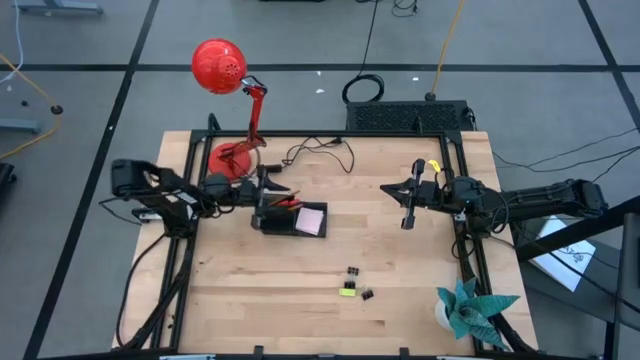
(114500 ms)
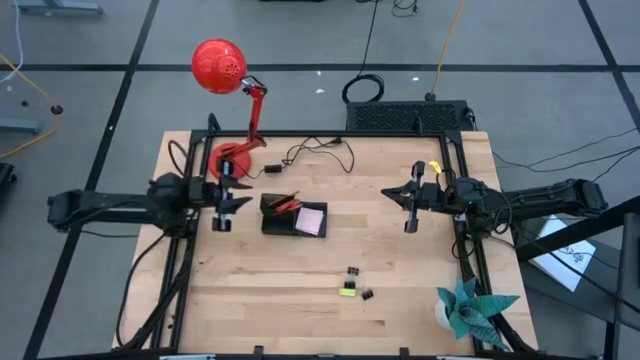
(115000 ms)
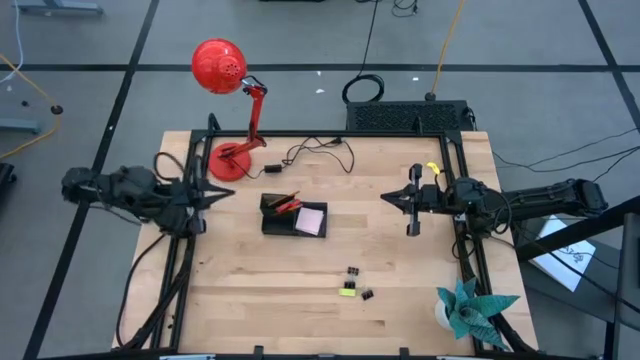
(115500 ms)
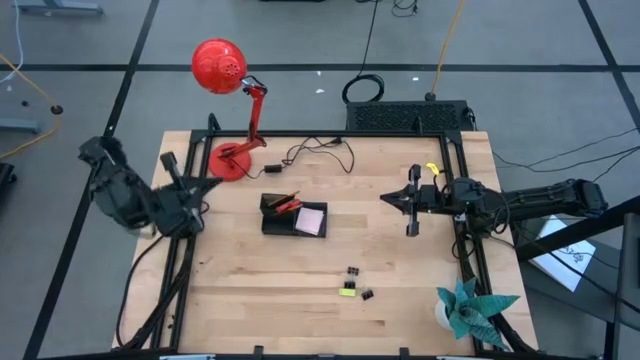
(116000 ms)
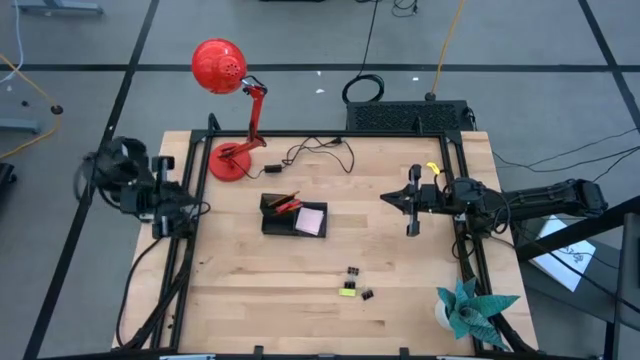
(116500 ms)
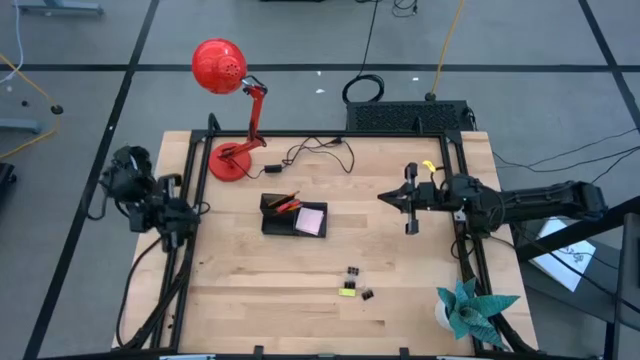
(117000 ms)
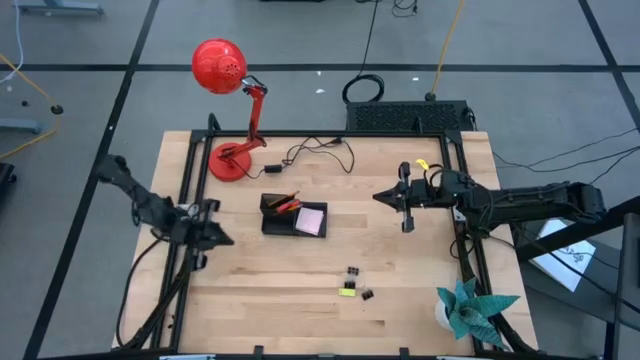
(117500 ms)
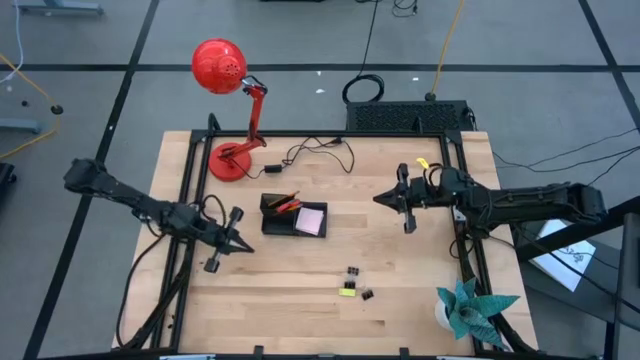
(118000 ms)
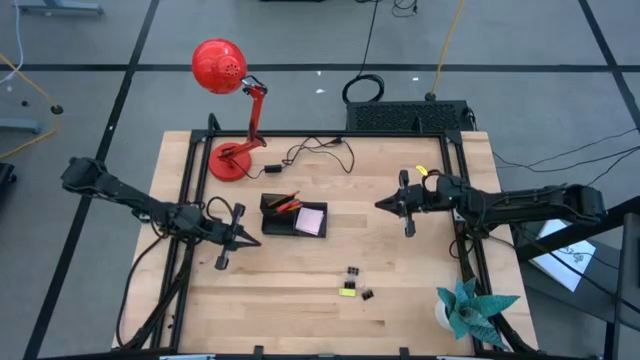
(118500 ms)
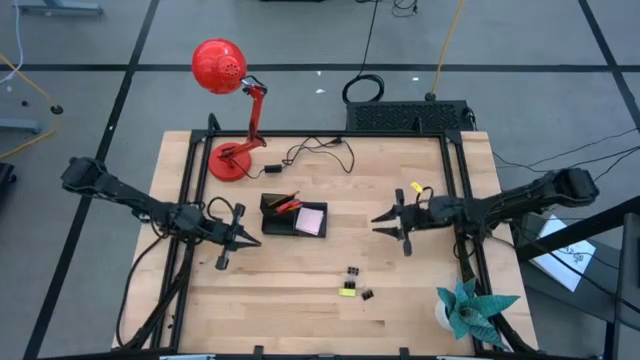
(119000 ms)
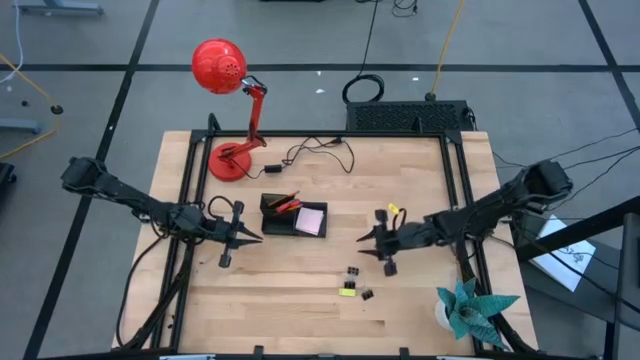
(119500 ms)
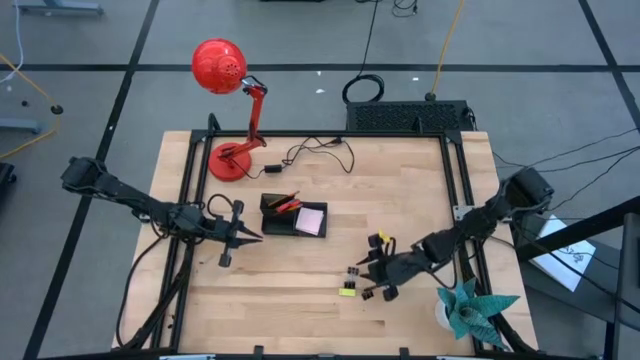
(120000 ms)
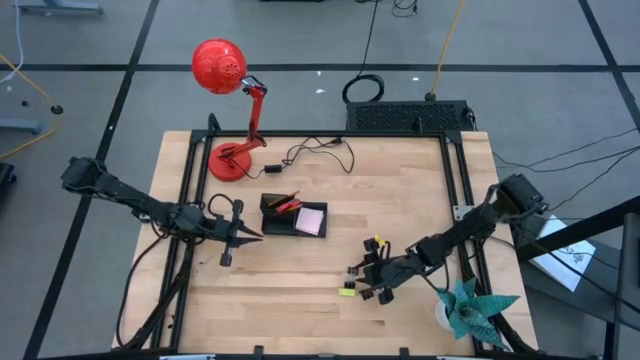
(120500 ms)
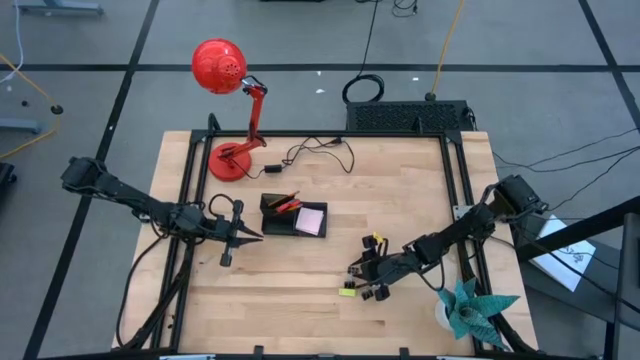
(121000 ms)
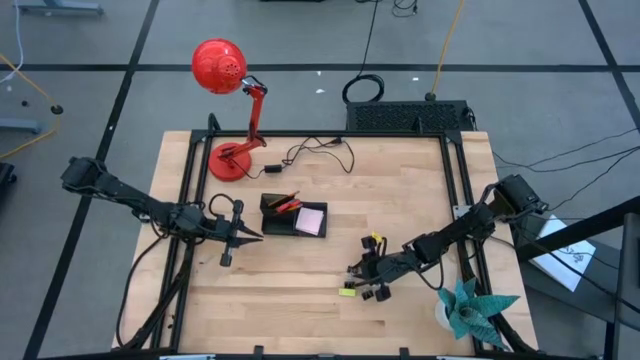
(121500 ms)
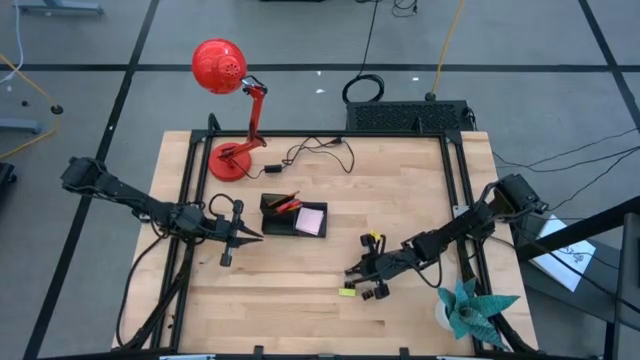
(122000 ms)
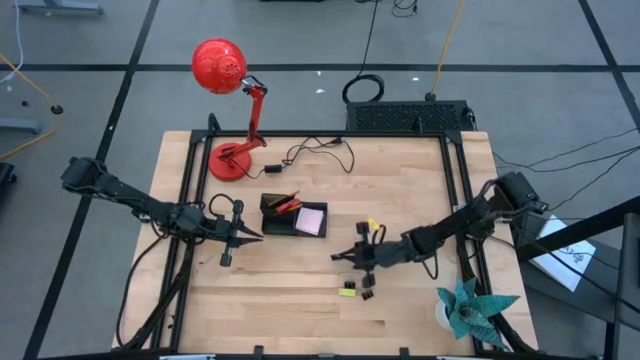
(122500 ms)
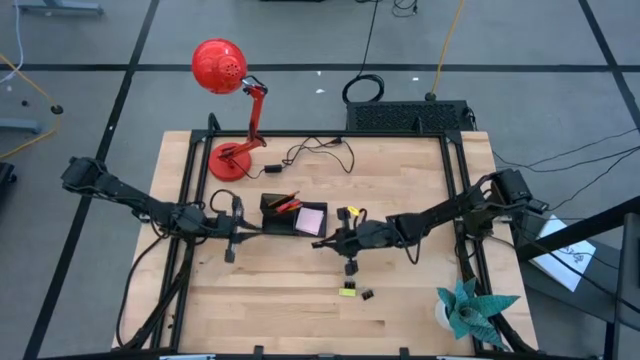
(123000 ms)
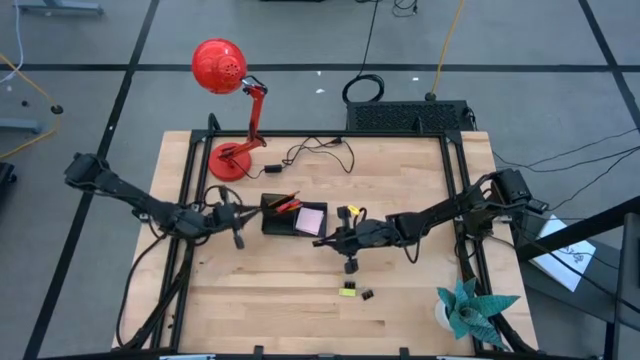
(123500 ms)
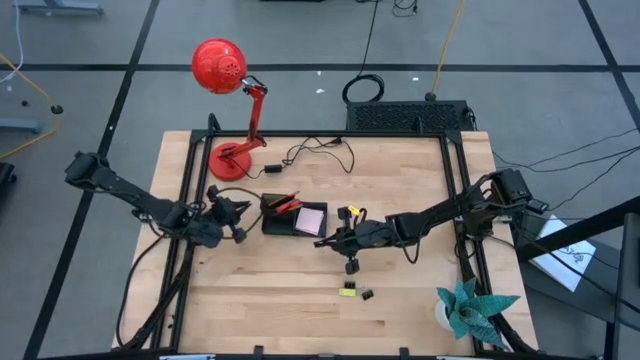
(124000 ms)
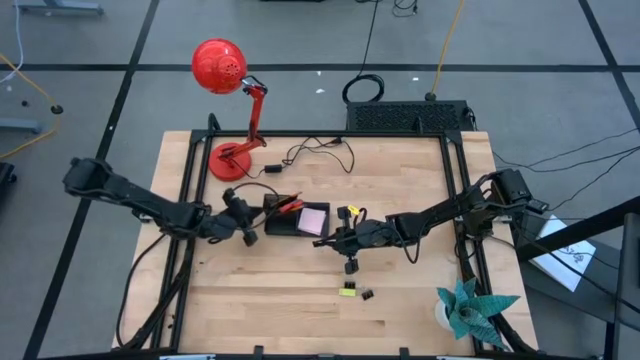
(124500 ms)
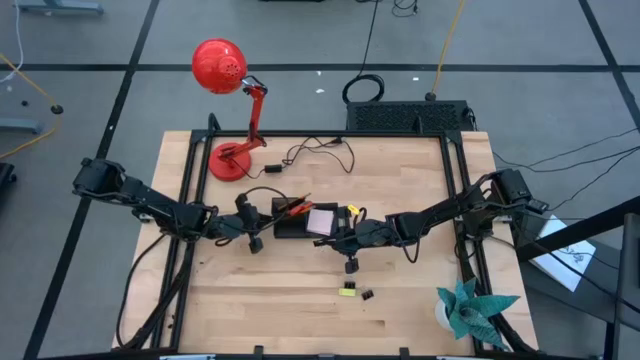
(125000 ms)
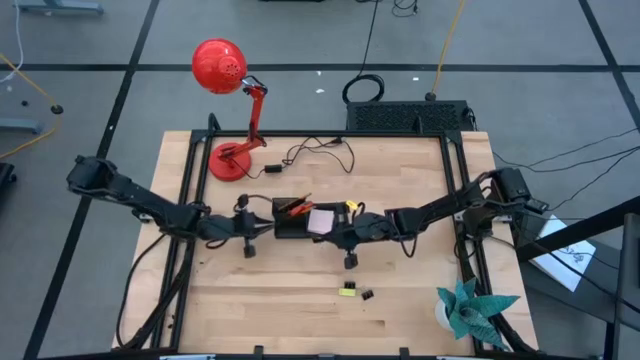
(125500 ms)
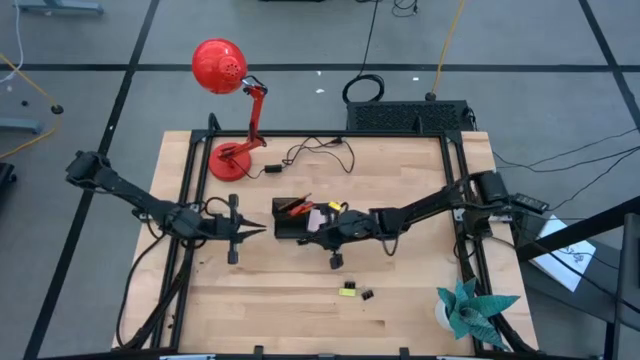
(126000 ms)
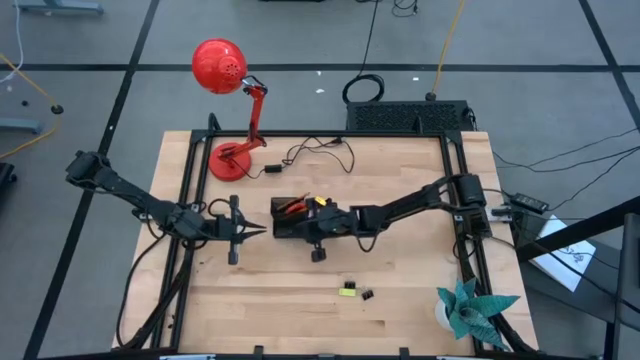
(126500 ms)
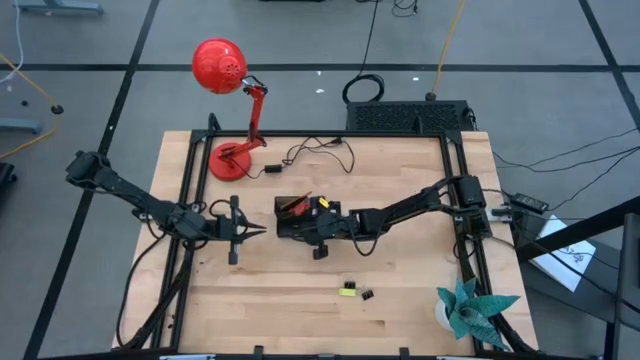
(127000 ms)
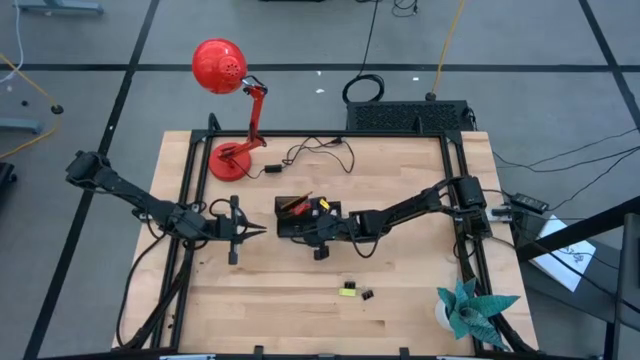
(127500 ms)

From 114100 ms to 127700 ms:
Task: Pick and place office supplies into organizer
Put the top binder clip into the desk organizer

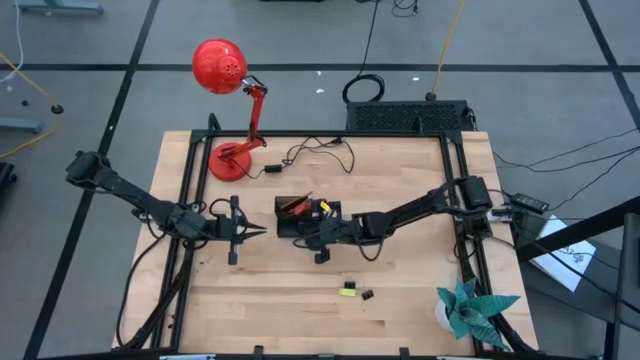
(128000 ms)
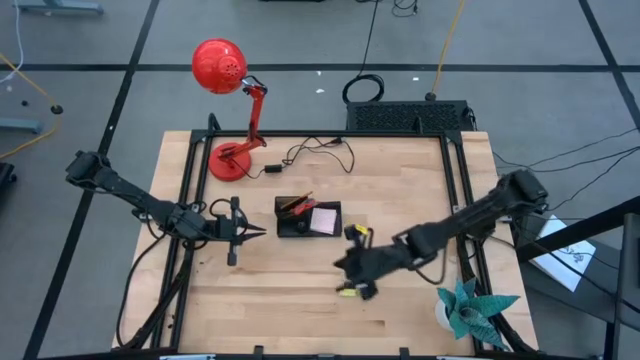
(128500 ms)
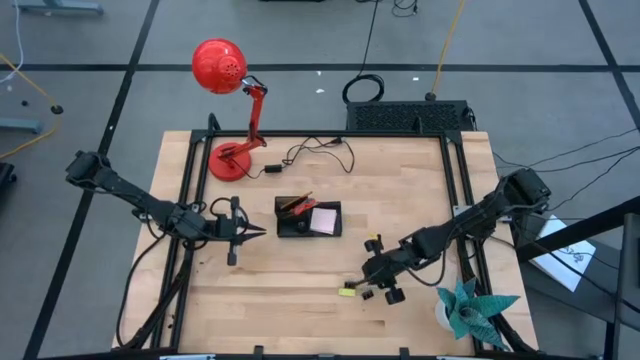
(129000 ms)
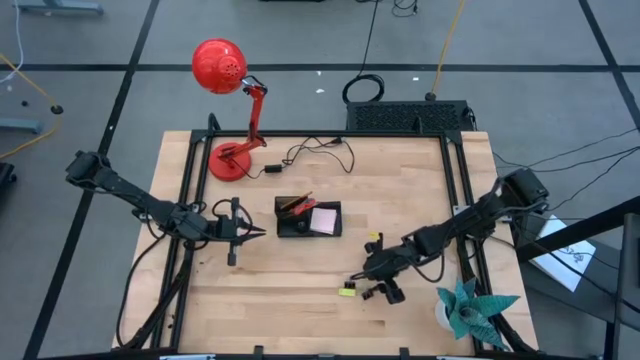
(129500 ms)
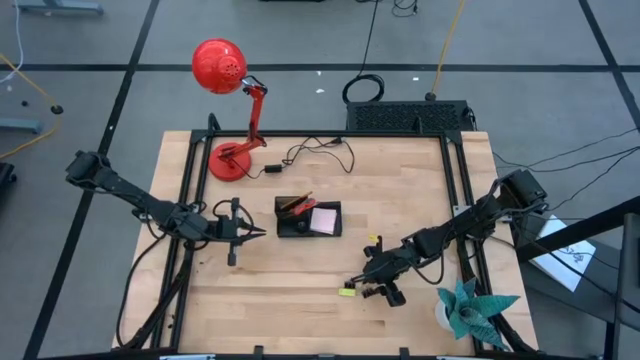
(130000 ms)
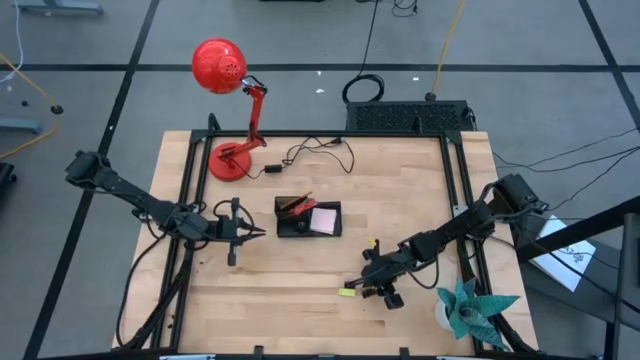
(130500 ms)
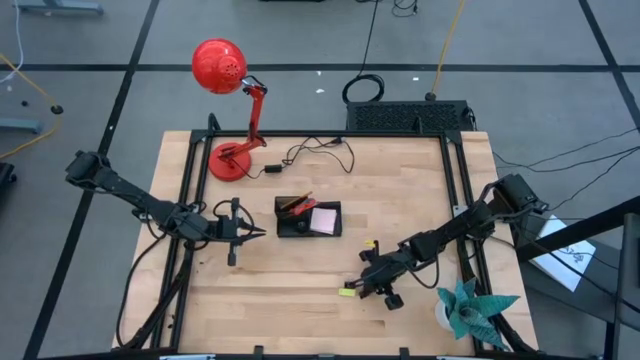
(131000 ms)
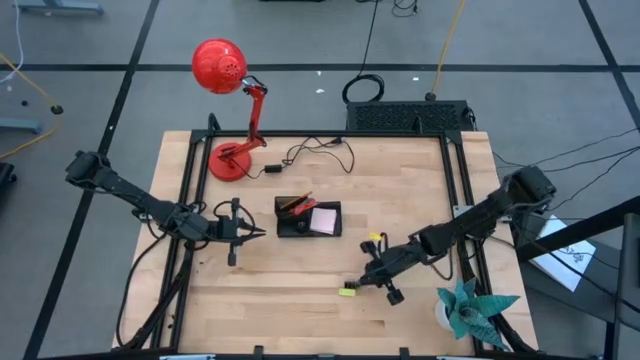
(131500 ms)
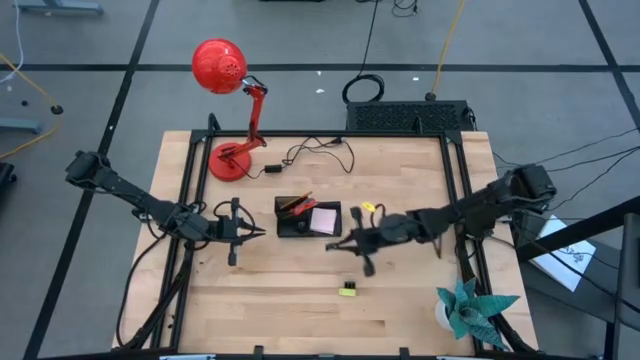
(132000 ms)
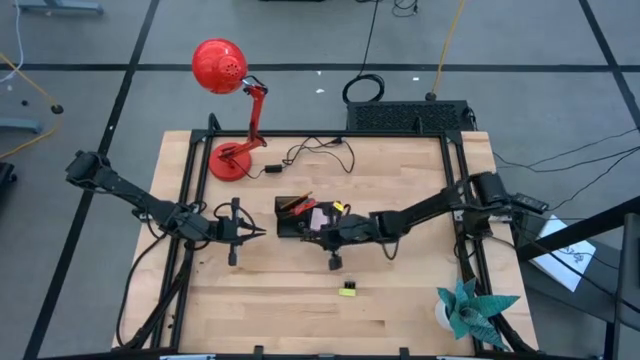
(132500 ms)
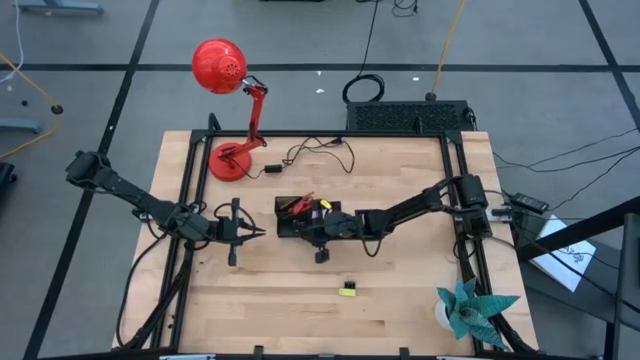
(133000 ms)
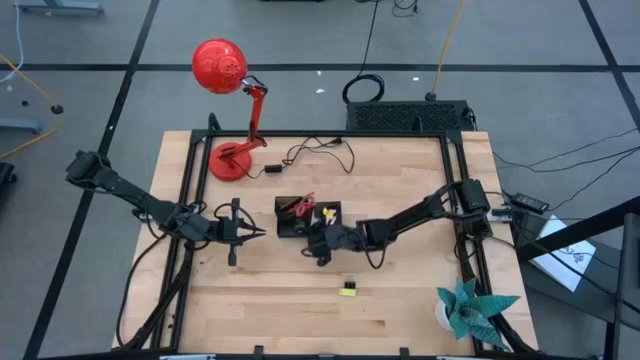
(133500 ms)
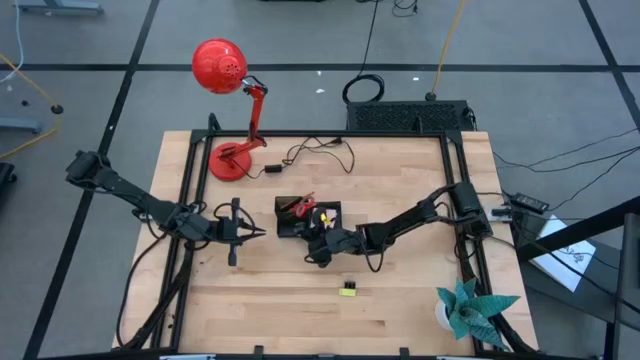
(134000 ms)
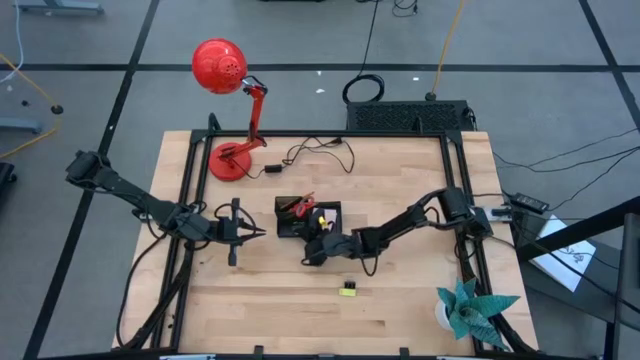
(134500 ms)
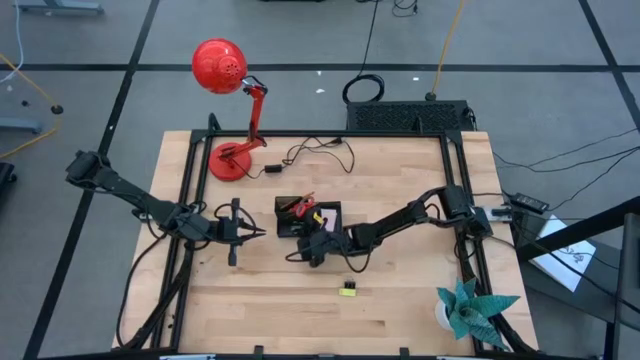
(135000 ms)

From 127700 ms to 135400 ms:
Put the right binder clip into the desk organizer

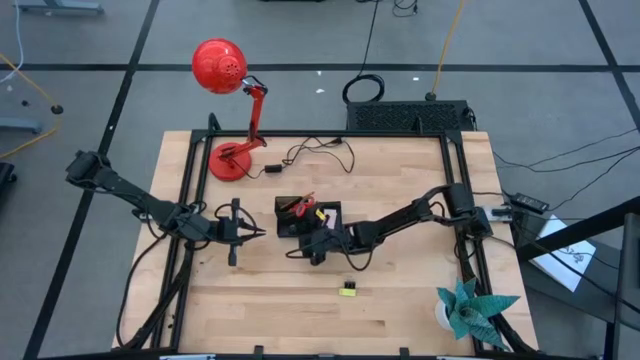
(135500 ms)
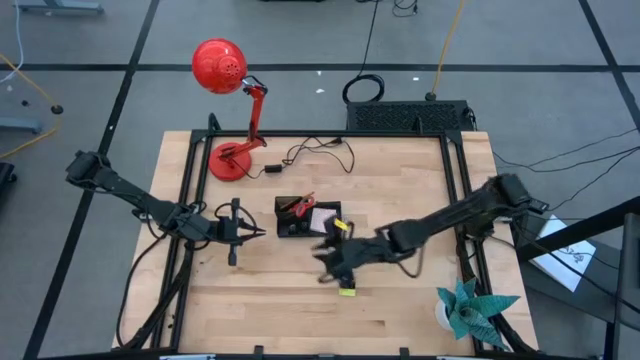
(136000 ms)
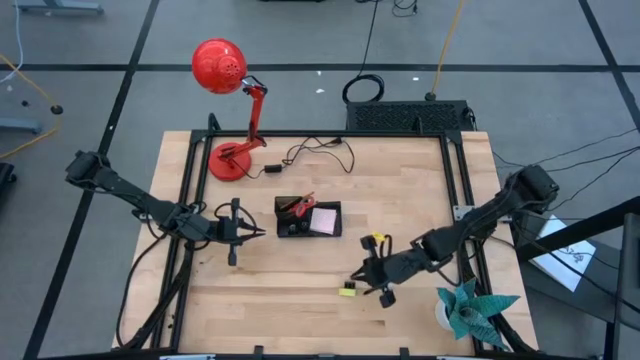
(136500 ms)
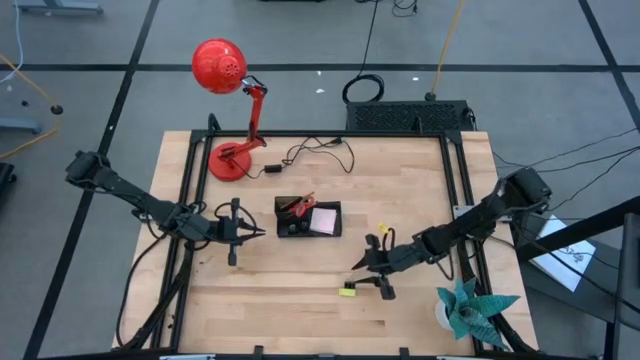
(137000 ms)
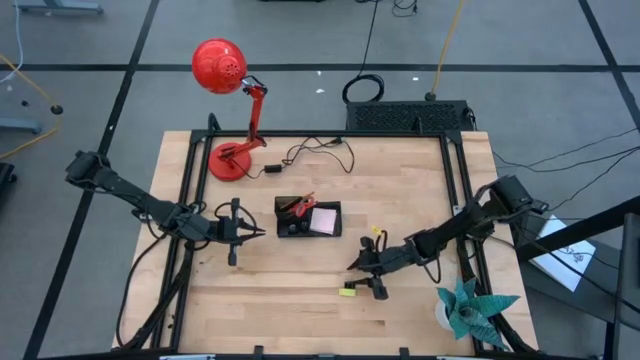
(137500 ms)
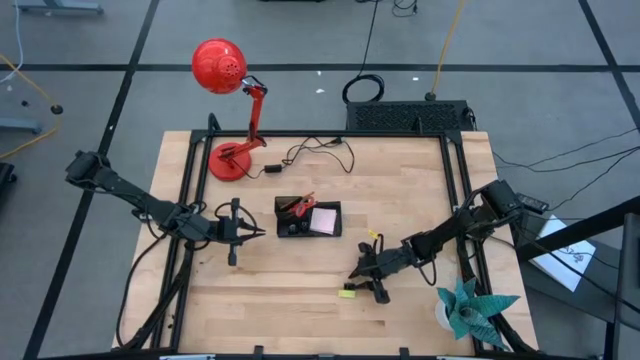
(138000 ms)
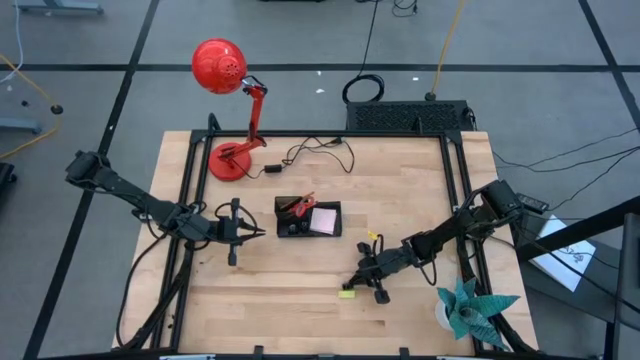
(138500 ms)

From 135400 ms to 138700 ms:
Put the binder clip into the desk organizer
